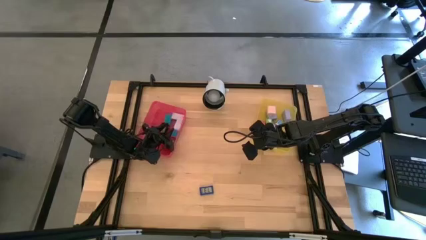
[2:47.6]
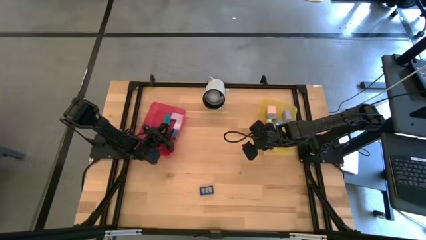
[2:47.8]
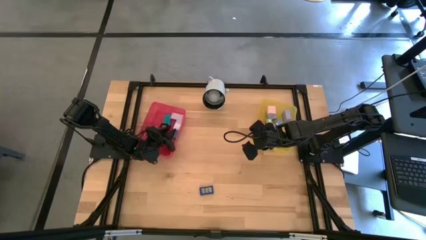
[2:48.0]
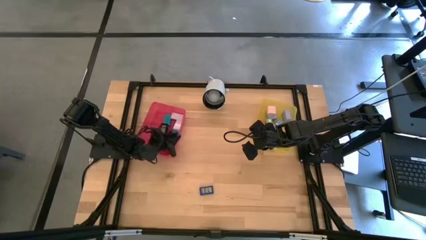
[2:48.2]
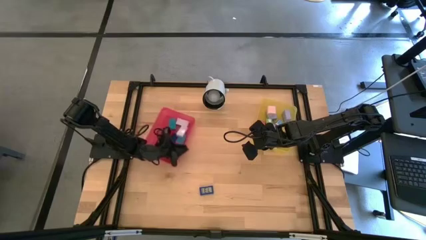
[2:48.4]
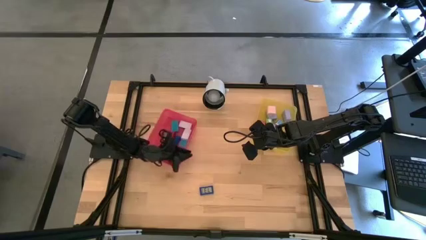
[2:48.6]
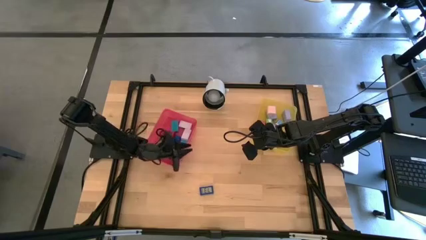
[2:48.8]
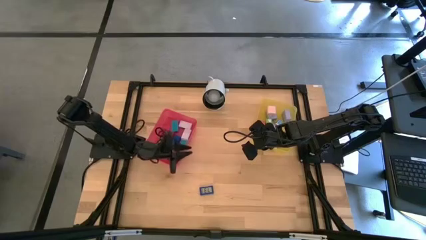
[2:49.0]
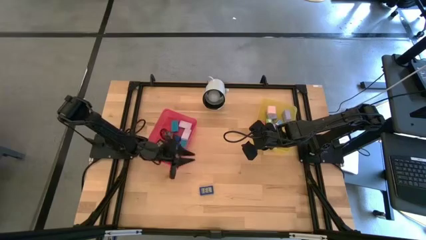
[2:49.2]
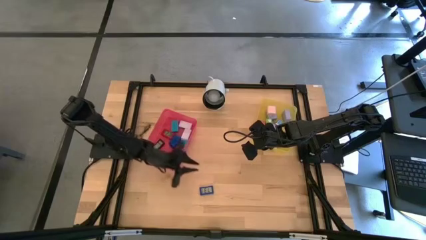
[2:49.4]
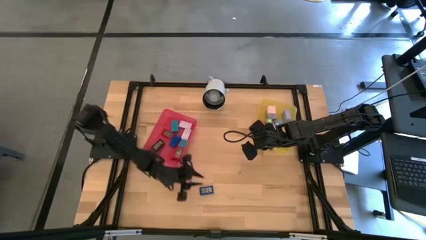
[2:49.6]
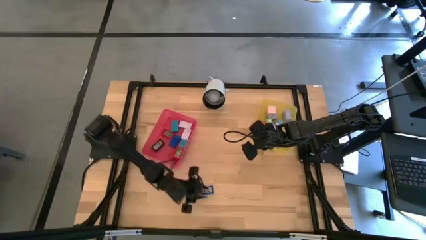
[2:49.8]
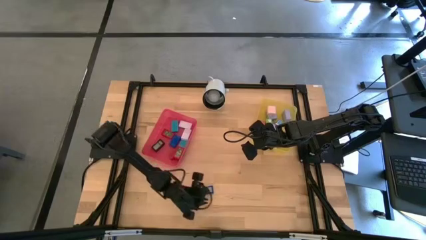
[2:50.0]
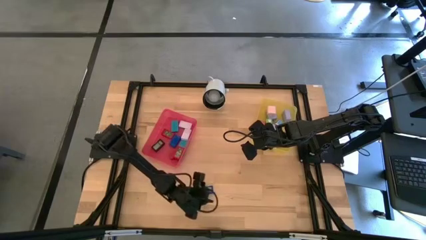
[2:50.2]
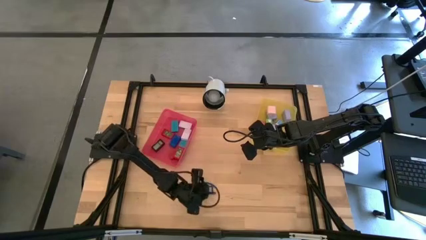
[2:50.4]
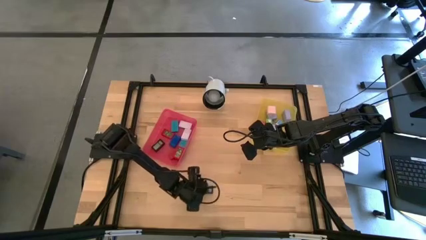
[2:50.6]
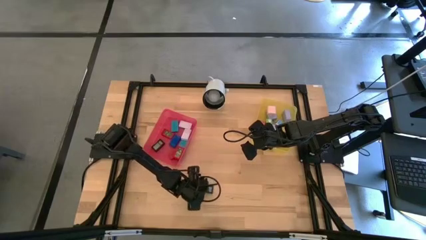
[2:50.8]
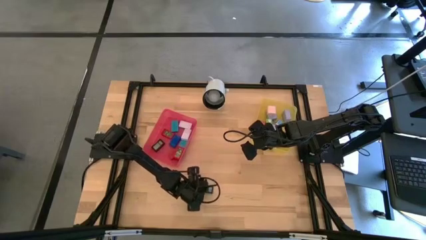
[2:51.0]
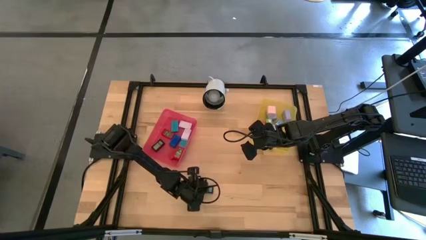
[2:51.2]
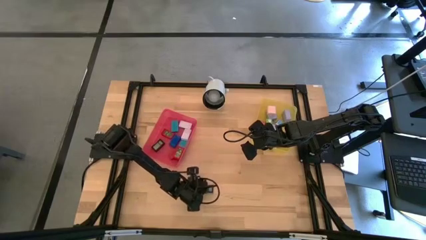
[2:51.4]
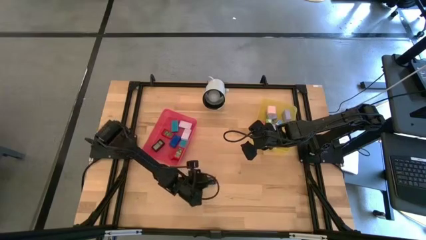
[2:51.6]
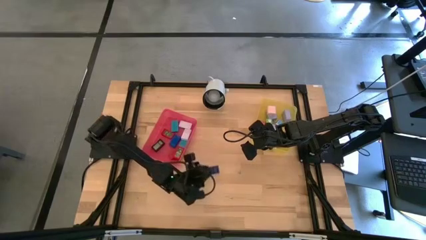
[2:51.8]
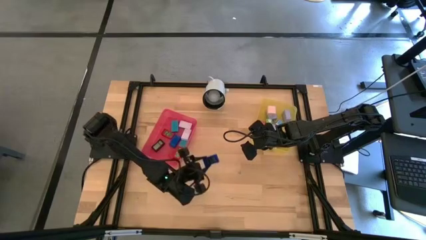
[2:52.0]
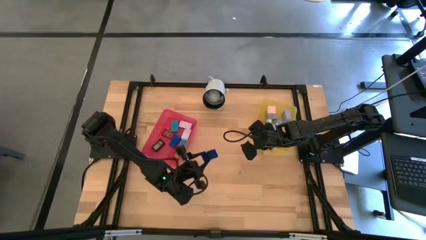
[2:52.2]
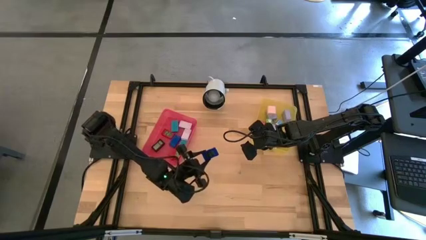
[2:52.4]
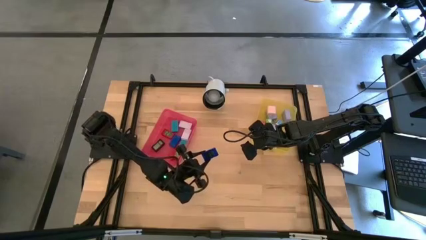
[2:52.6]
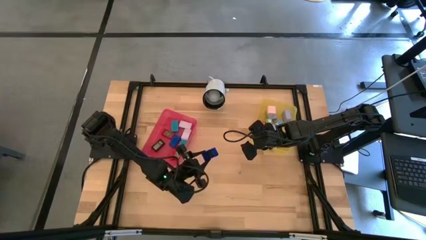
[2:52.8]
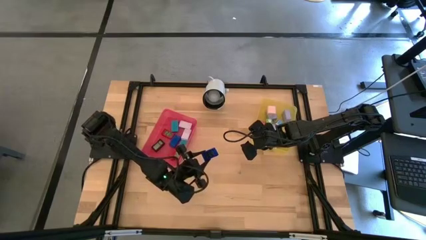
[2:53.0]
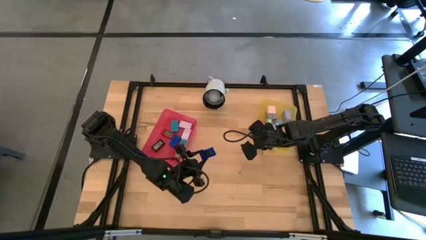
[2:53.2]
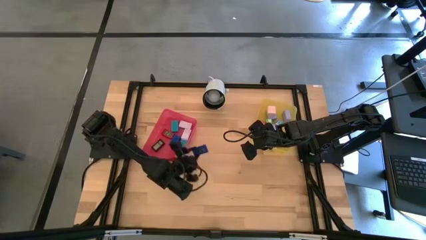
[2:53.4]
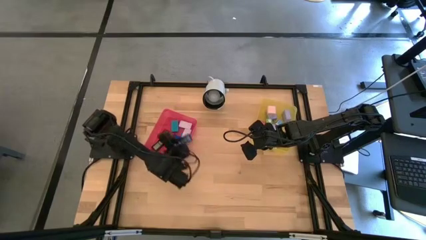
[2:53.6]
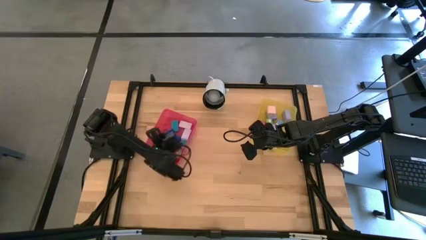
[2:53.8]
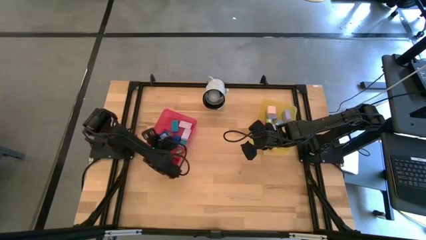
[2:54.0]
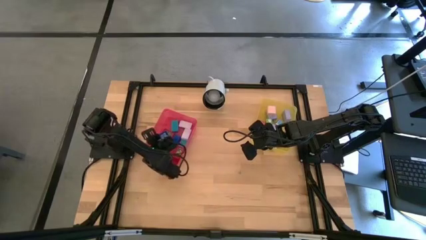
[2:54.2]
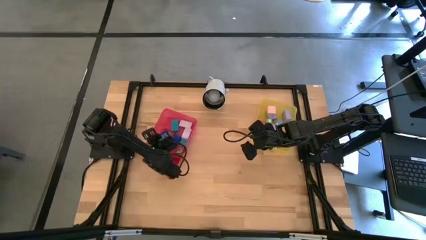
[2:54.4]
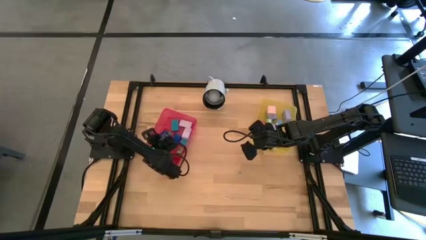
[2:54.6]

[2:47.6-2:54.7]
Task: Pick & Place Office items
Put the dark blue digital timer into the pink bin

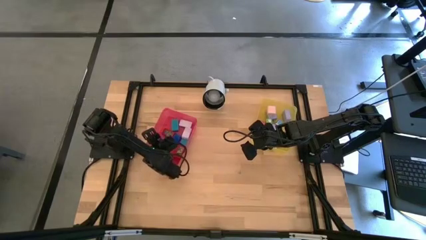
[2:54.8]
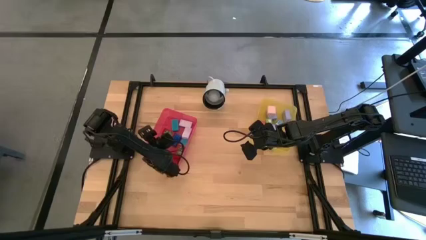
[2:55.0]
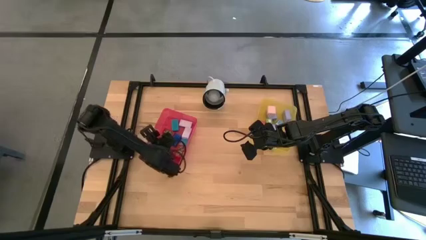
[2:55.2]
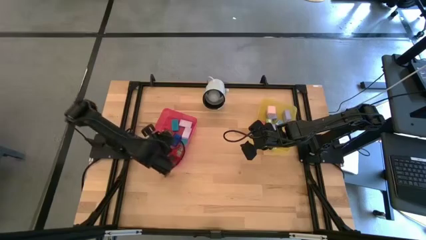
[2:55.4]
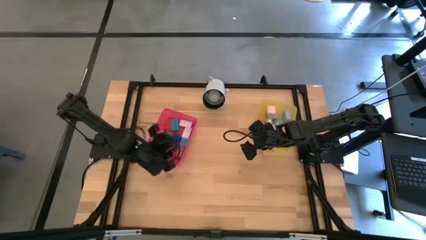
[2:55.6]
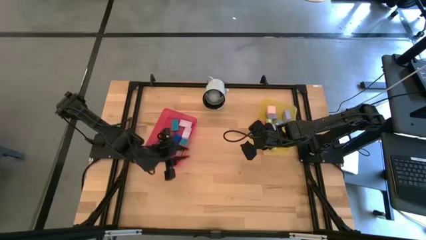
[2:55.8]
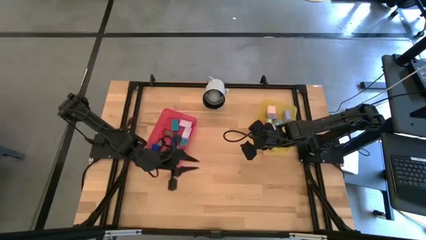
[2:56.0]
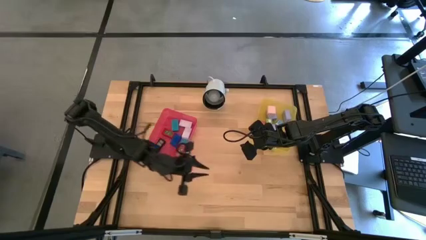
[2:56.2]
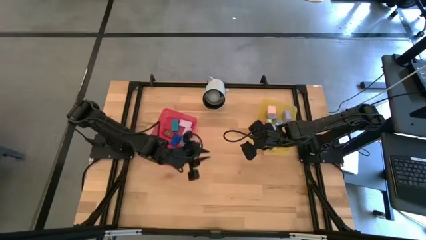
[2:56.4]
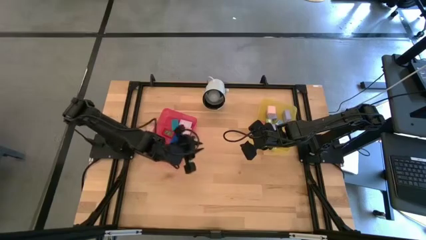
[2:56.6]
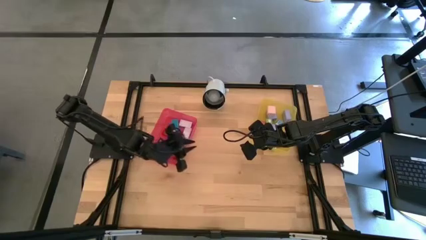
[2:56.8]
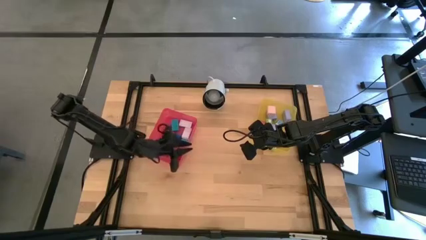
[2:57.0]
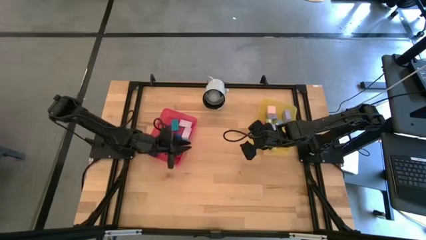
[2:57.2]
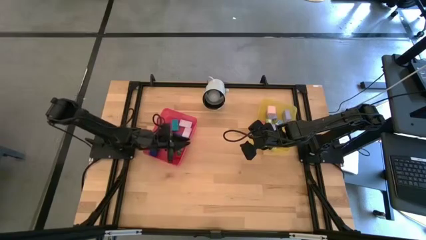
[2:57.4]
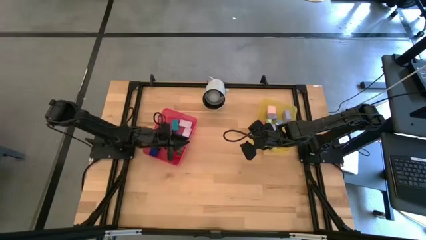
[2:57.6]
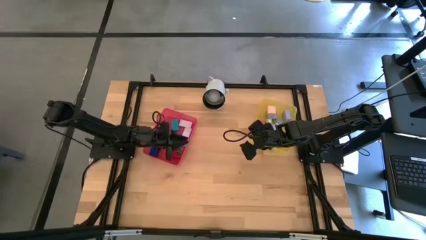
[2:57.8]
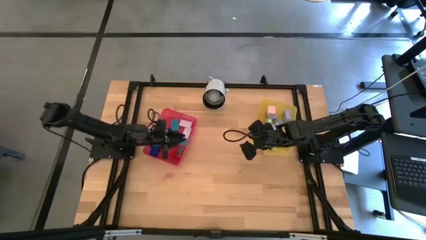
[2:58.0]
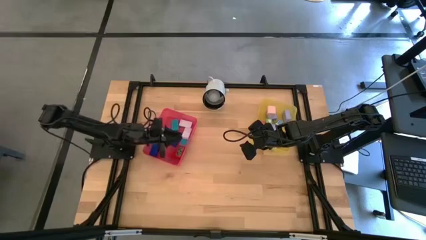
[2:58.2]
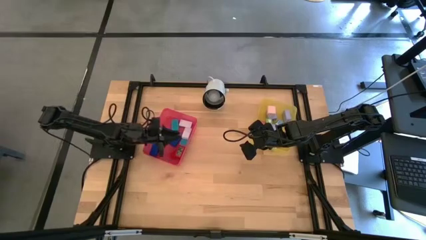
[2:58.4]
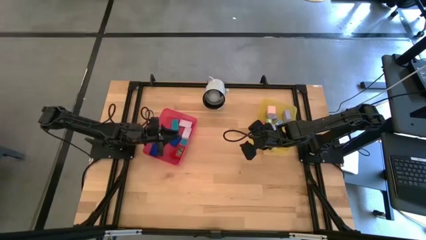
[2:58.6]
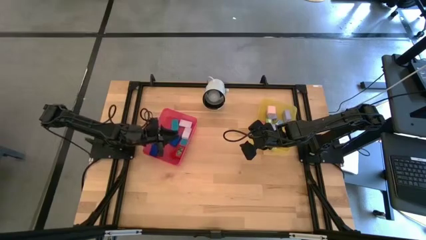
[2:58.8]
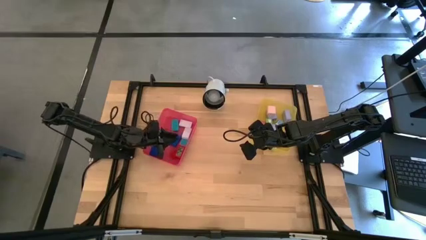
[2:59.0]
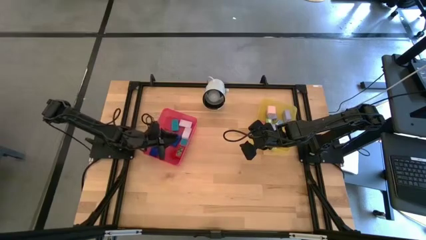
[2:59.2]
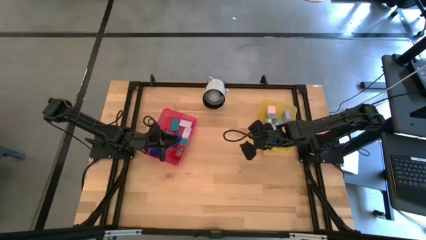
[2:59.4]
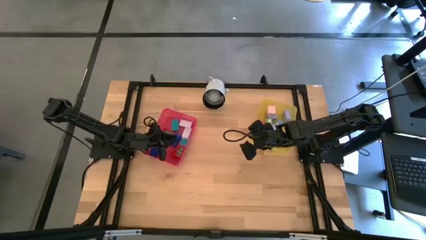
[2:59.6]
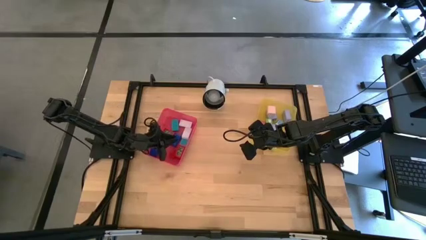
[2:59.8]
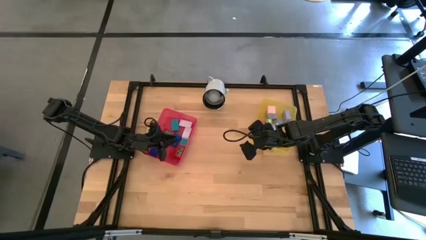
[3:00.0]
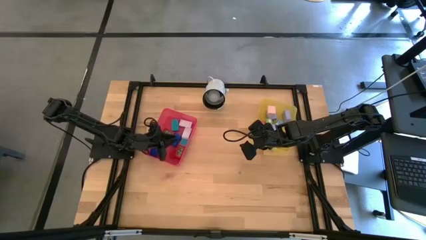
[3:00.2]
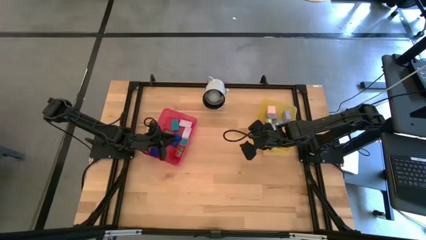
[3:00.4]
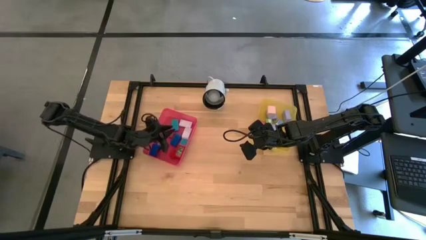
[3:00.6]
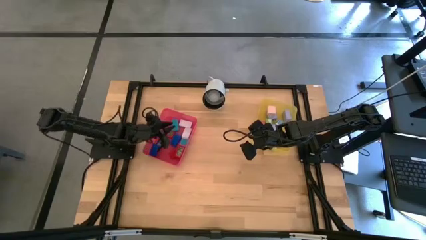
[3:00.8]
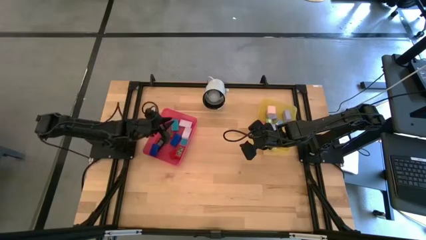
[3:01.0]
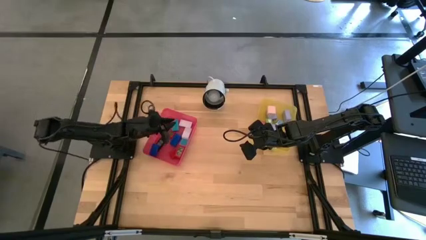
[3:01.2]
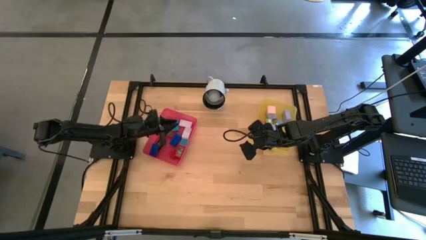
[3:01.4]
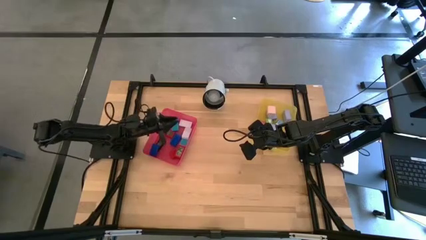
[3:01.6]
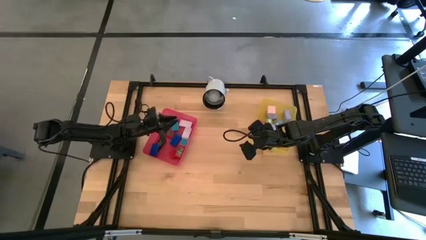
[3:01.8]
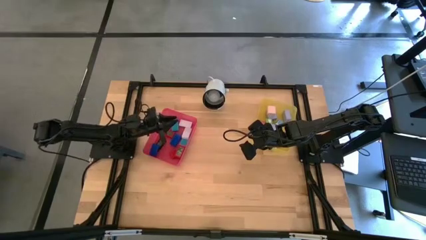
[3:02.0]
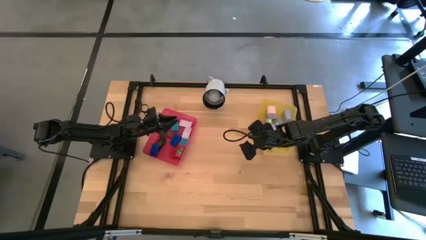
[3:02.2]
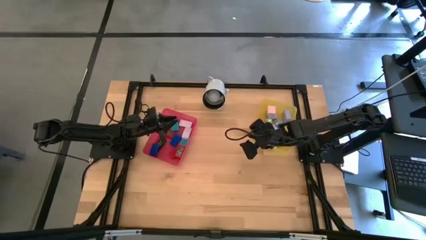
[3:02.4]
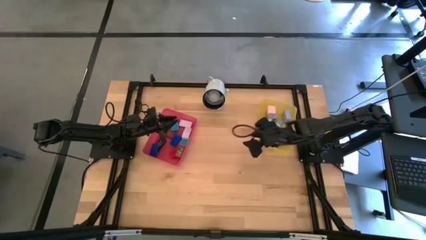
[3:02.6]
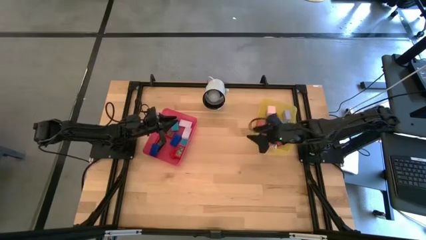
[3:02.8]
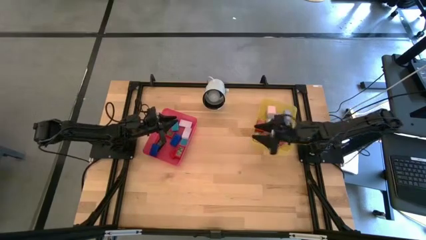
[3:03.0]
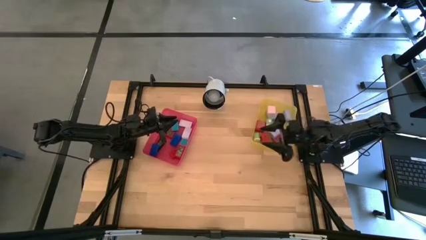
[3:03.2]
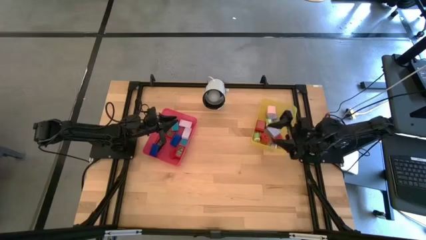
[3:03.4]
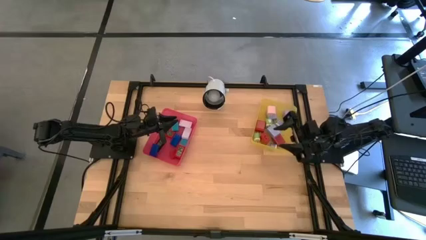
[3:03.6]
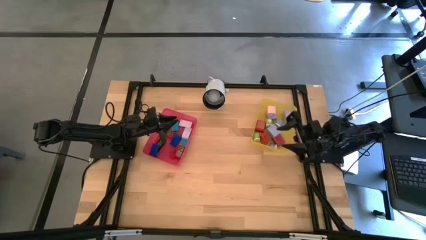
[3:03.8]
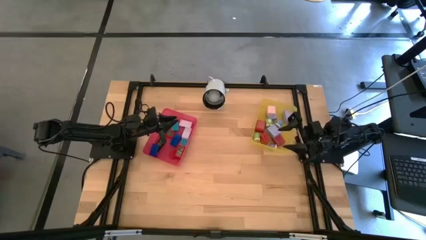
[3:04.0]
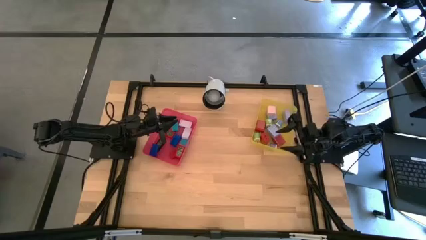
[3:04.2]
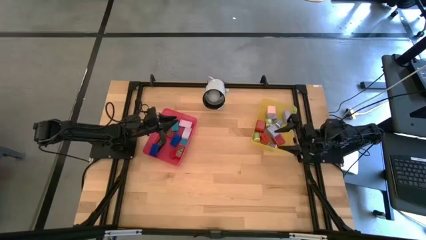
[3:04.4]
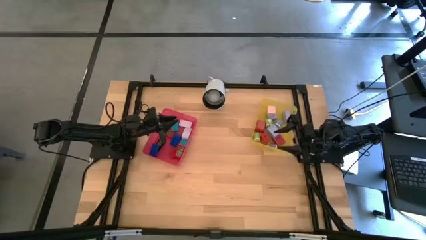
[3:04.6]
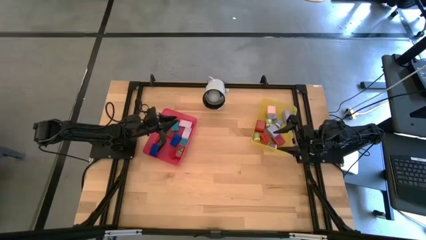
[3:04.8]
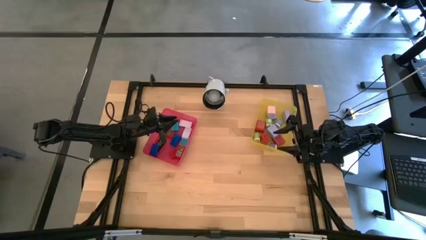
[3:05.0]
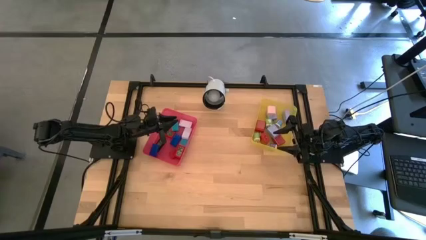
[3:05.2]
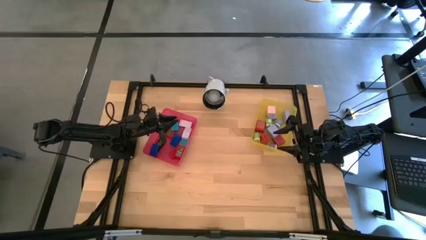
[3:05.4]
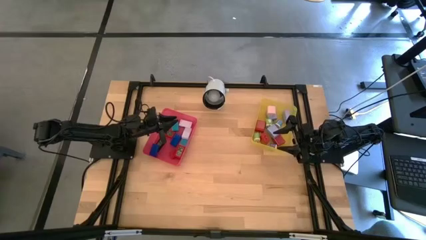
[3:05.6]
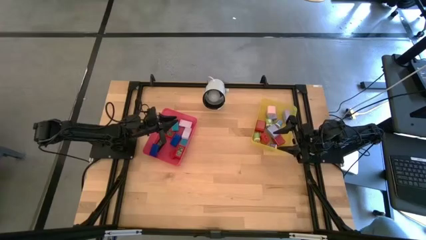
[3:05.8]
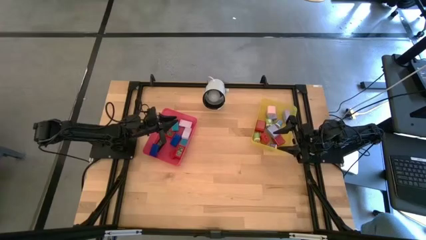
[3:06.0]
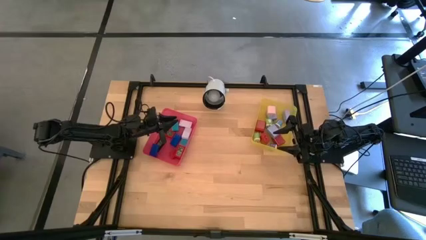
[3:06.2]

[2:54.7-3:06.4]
Return to Home Position
